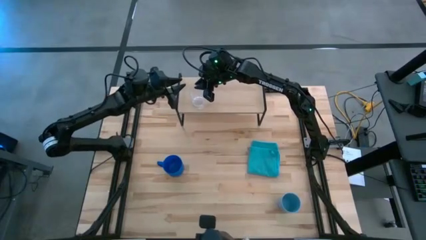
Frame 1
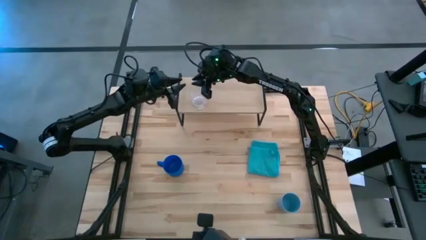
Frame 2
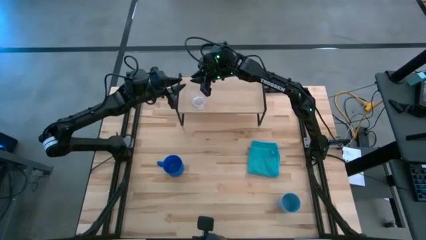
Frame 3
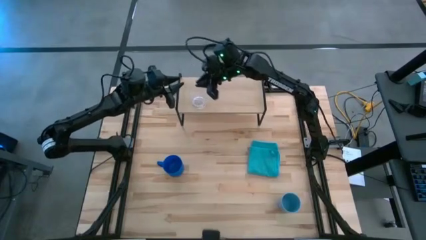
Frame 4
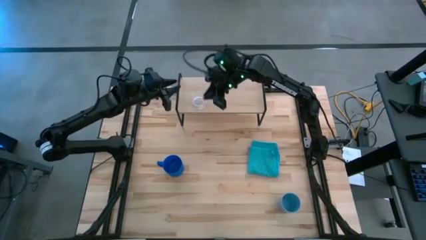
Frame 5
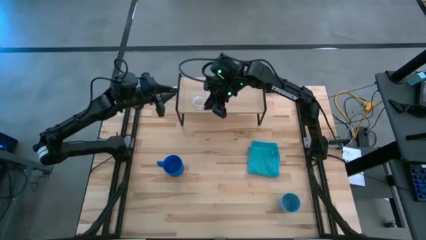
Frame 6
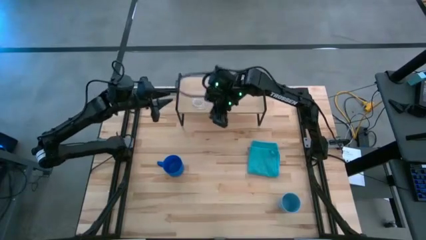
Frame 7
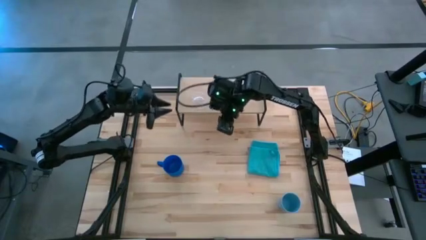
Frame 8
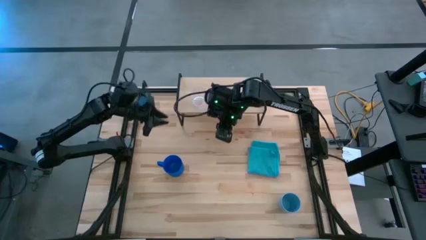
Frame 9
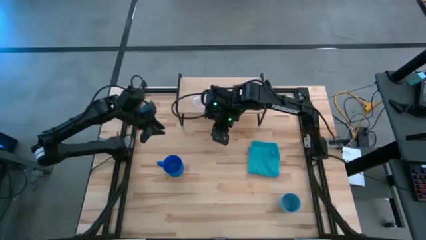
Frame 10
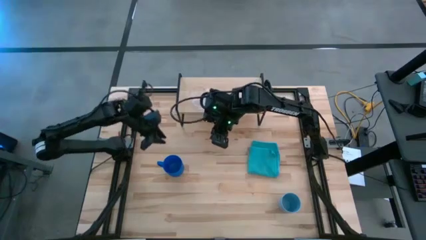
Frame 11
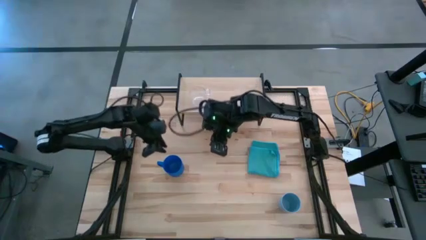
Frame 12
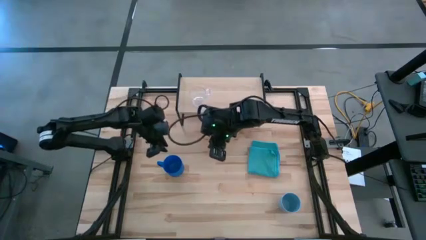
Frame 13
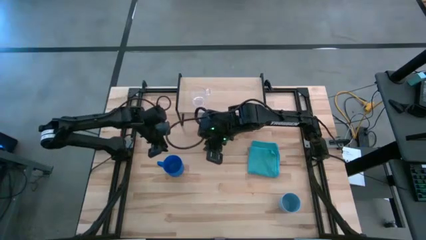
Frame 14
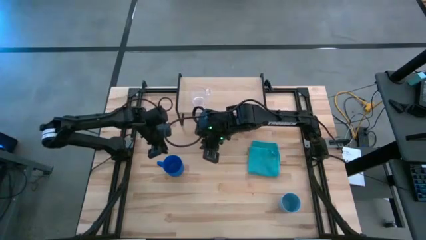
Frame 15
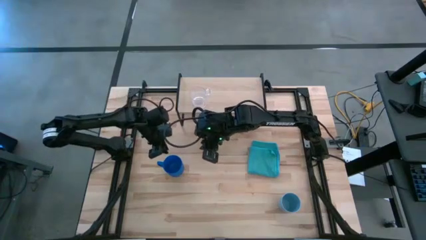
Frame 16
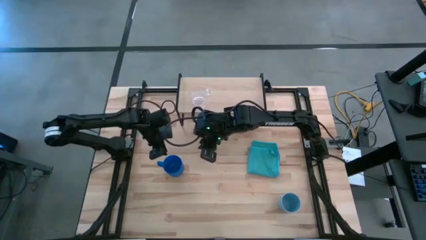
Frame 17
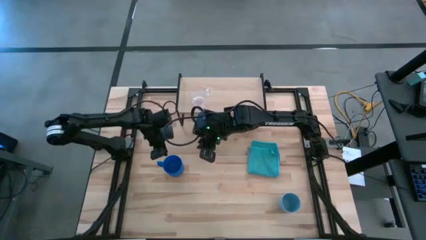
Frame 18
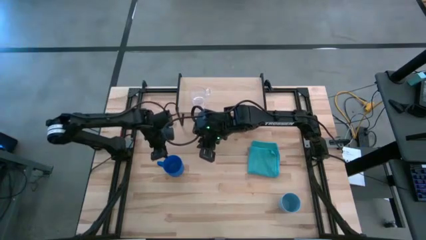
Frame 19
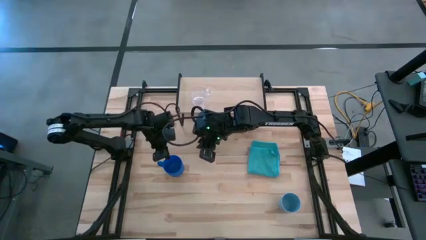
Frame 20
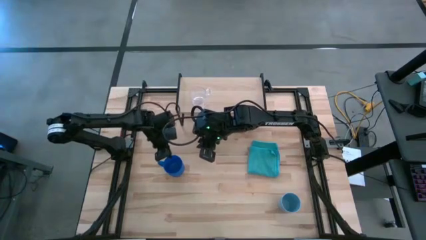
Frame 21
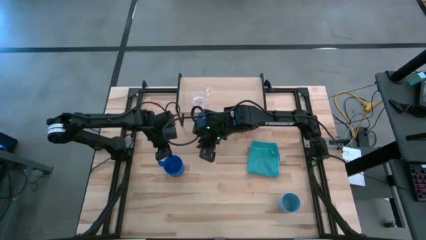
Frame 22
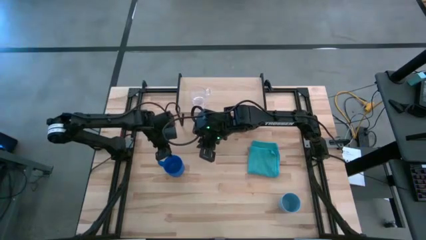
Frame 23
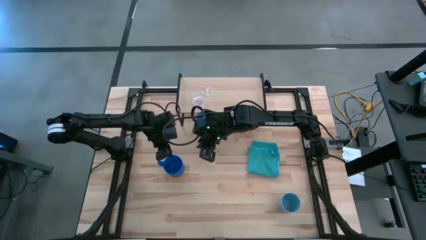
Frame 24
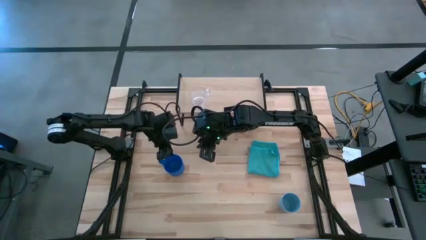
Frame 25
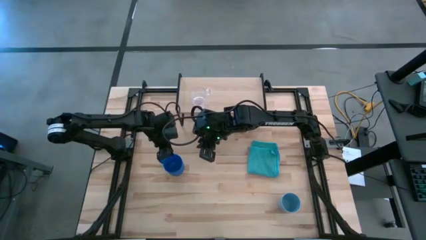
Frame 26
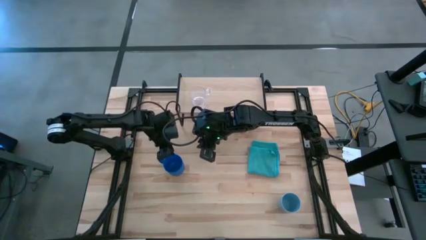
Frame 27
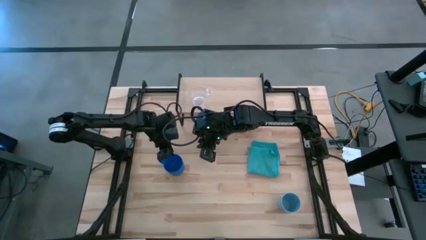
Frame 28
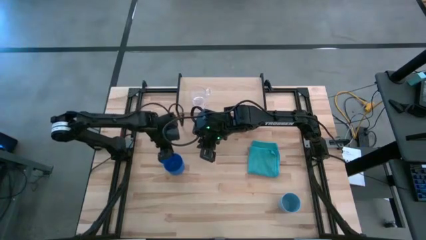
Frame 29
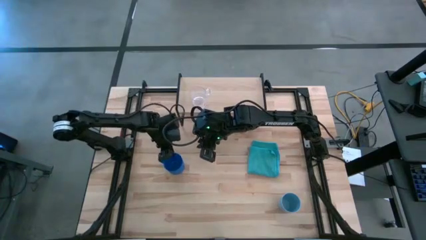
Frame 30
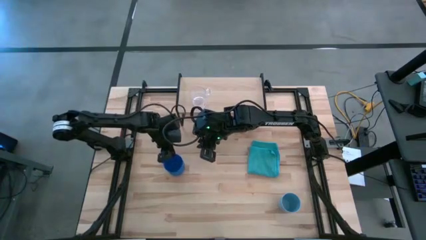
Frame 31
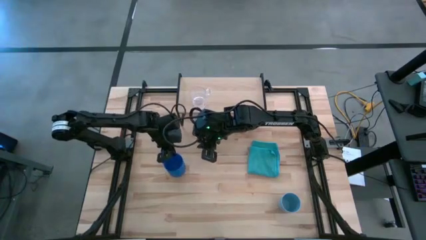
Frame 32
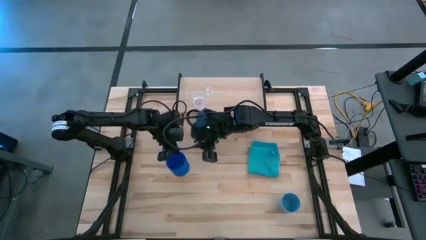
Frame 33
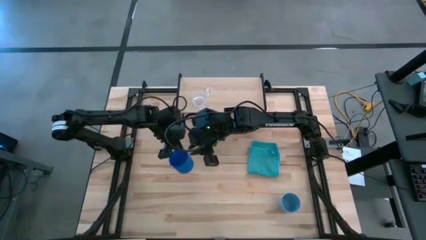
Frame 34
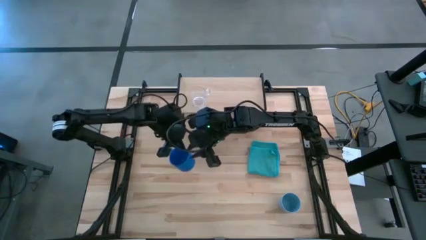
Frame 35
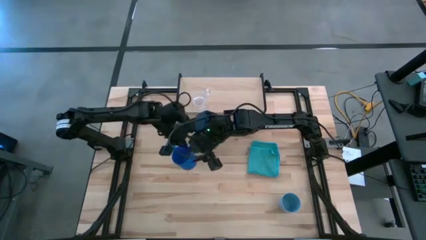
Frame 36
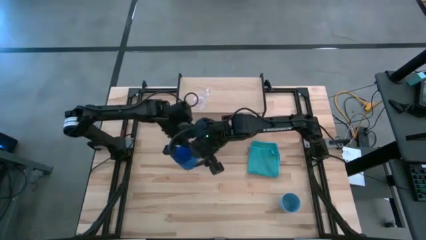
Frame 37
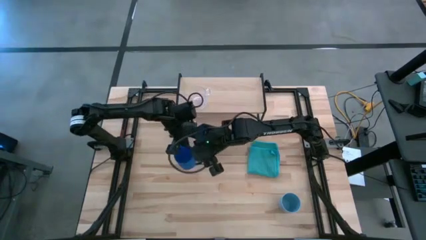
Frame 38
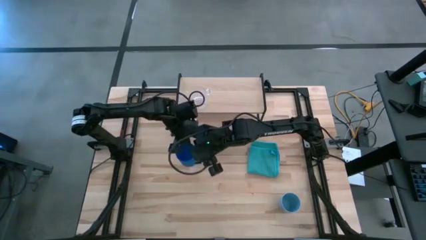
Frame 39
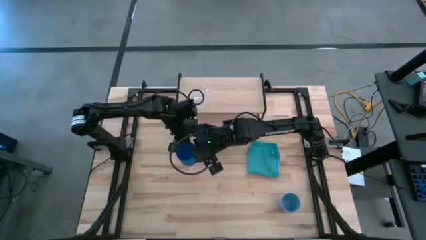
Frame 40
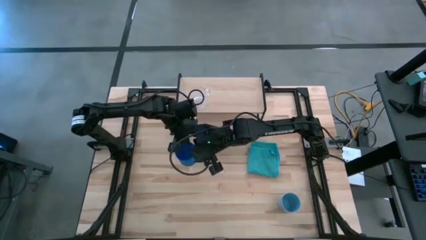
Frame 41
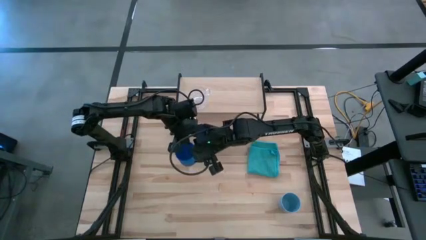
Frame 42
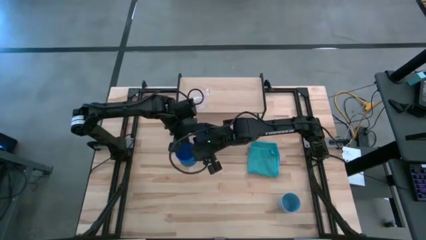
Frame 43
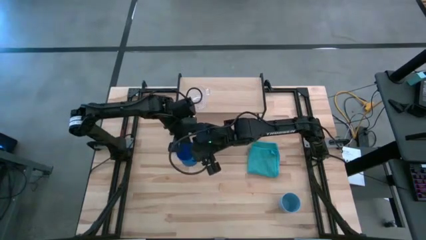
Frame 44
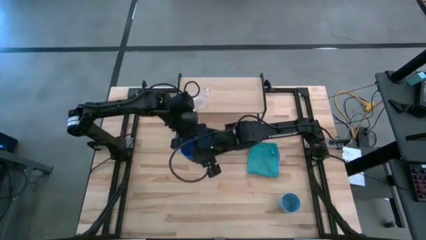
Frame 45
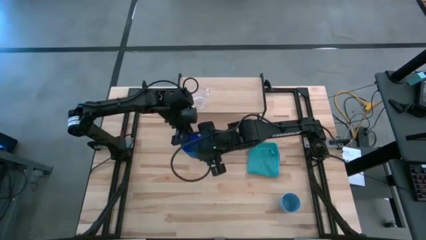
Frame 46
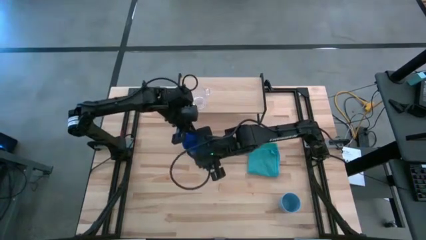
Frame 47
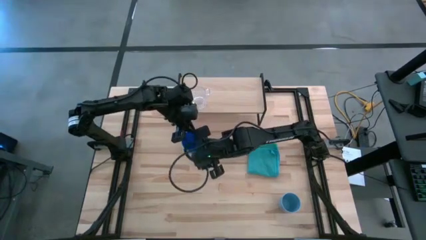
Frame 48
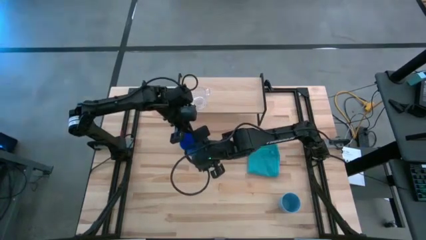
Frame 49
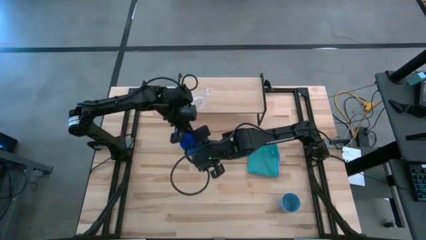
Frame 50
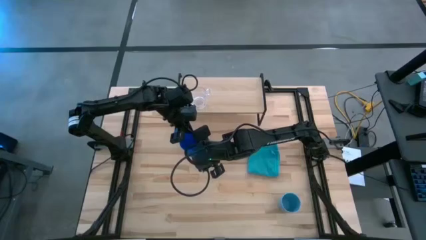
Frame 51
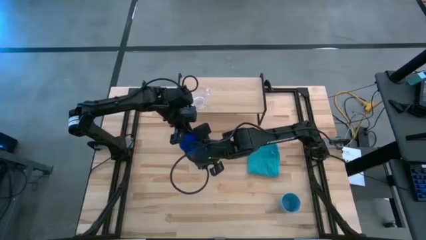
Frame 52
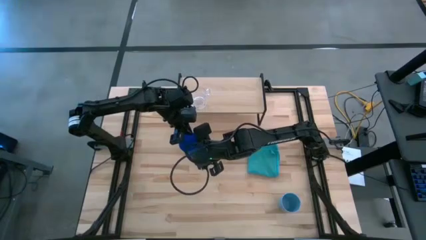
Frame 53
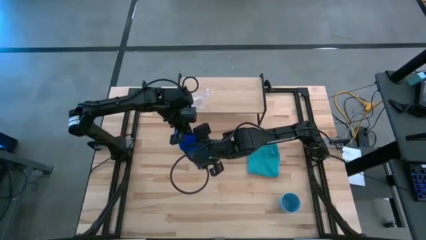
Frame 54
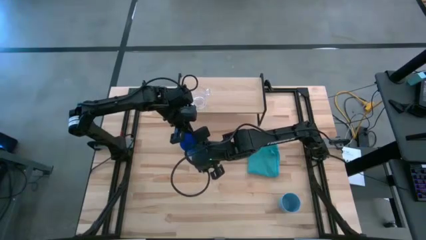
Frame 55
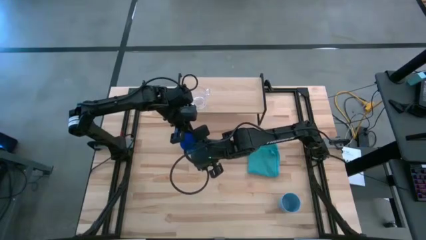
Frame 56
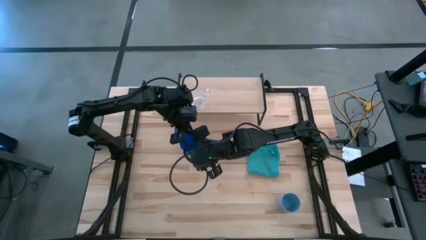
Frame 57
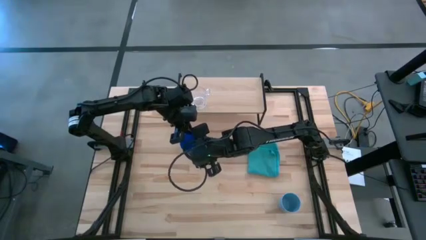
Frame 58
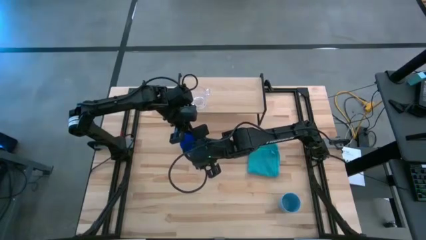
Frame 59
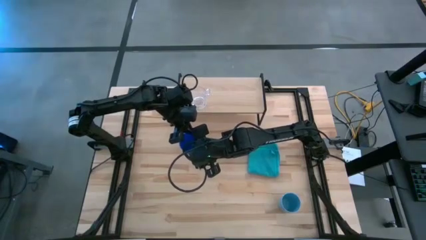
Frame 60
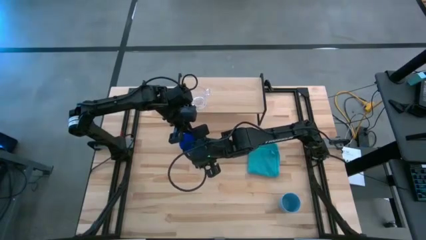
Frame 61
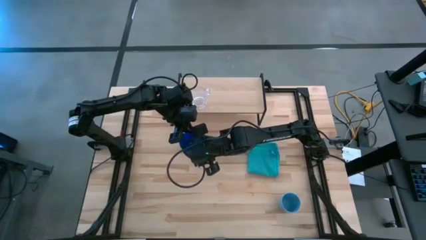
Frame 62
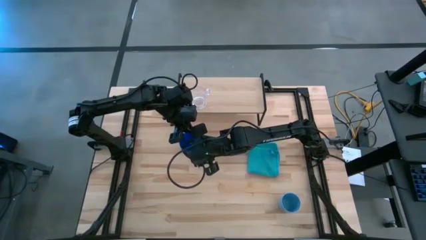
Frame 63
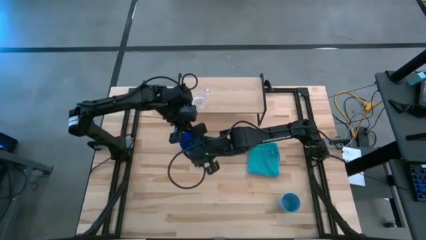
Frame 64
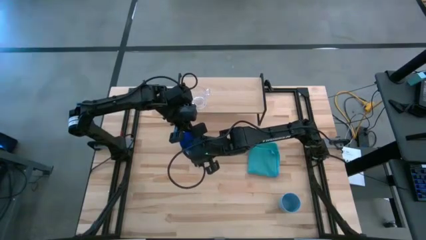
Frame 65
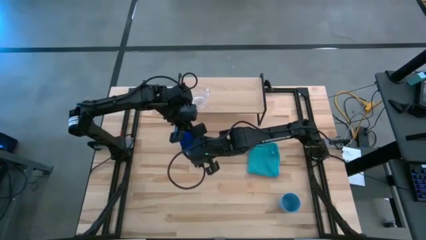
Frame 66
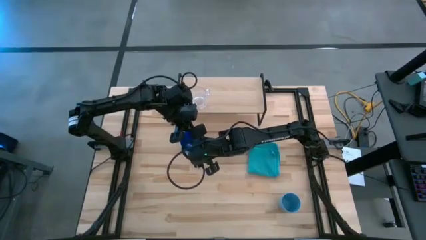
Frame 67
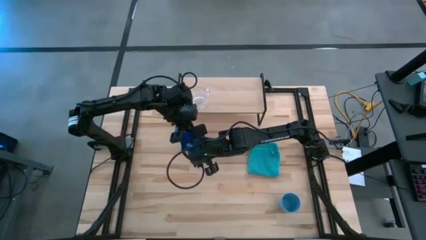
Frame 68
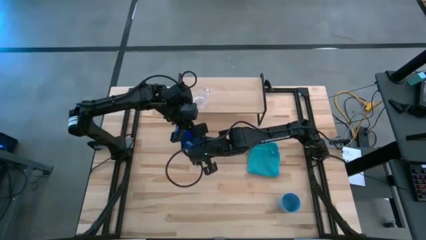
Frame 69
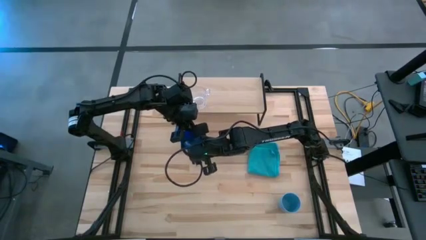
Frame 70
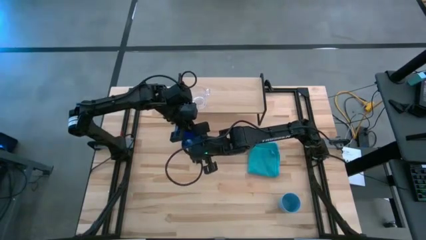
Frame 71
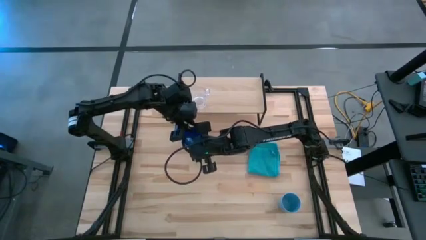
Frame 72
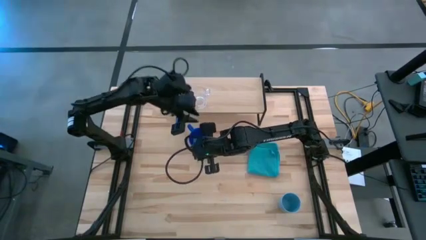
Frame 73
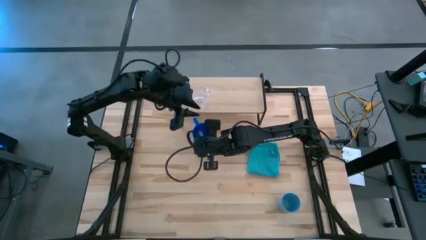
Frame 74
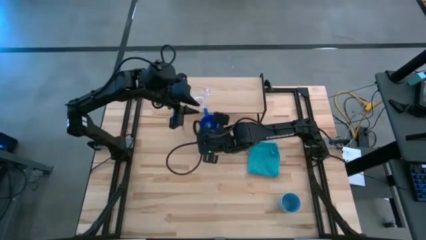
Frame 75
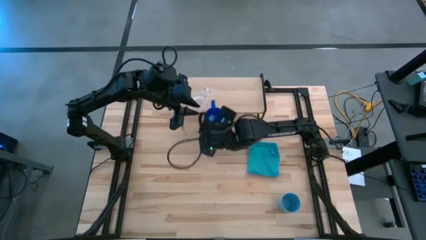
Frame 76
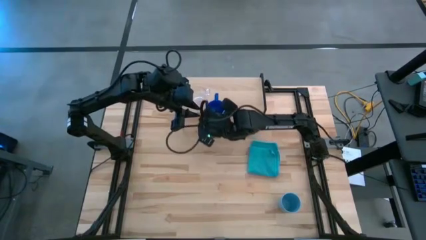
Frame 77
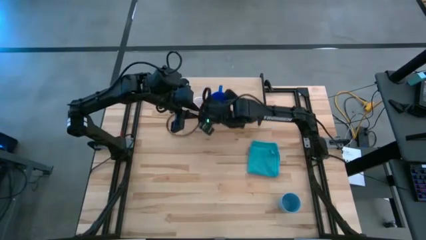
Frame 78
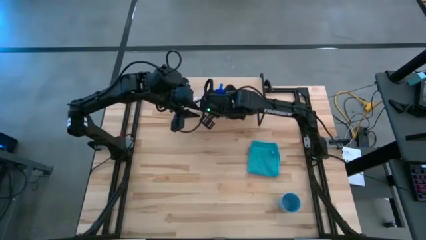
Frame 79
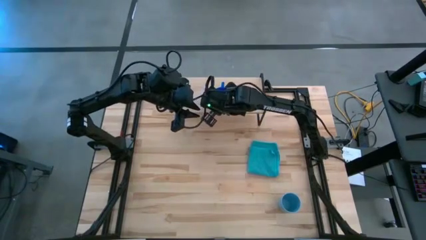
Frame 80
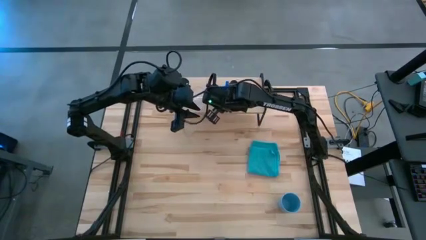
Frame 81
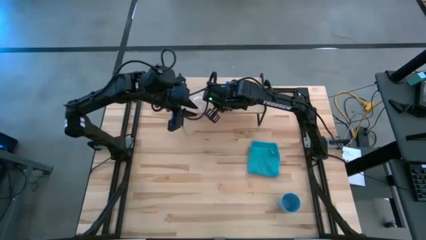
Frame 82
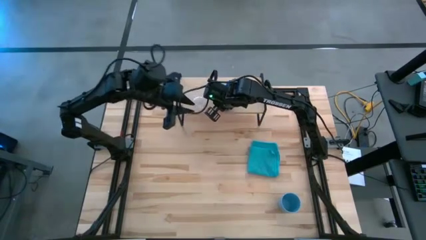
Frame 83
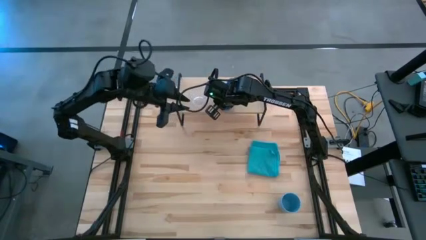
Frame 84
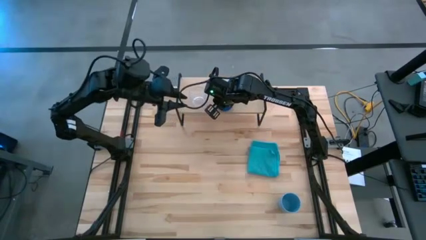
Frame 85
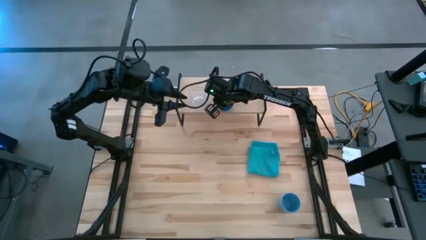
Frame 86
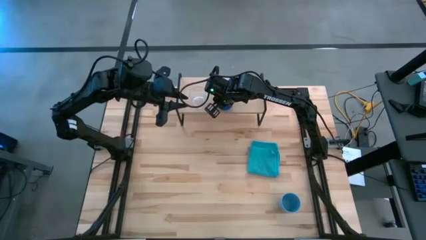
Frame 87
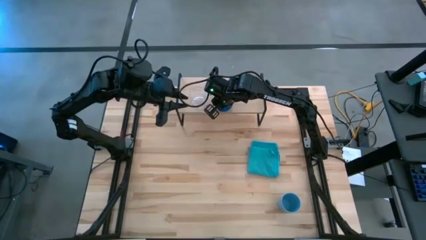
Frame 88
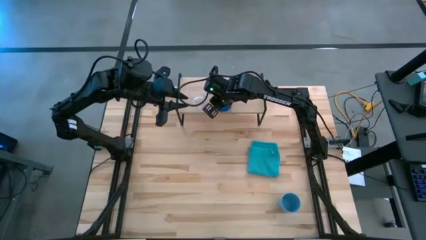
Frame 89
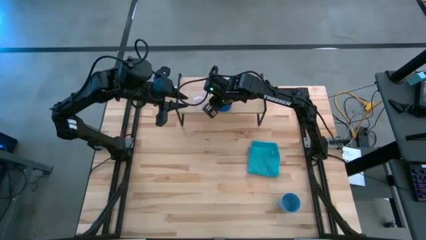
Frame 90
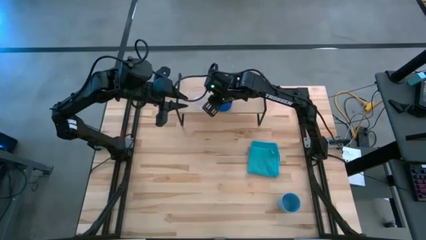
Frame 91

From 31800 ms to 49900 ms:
Task: Stack small to large cups/mugs on shelf
Put the blue mug on the shelf
